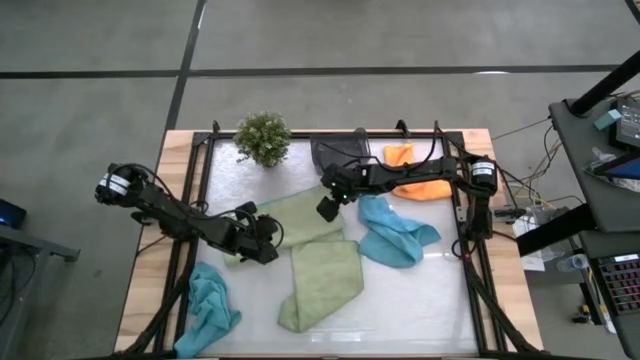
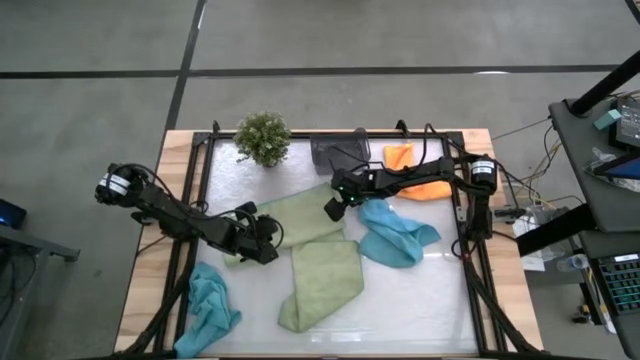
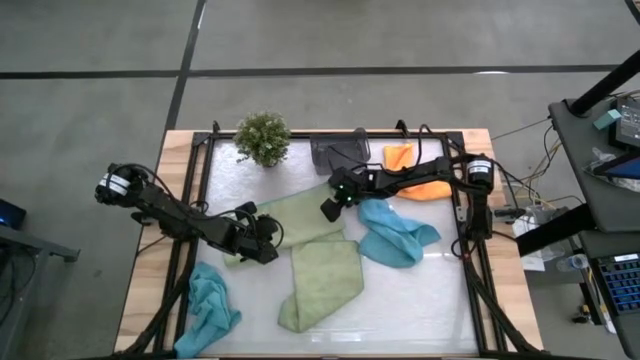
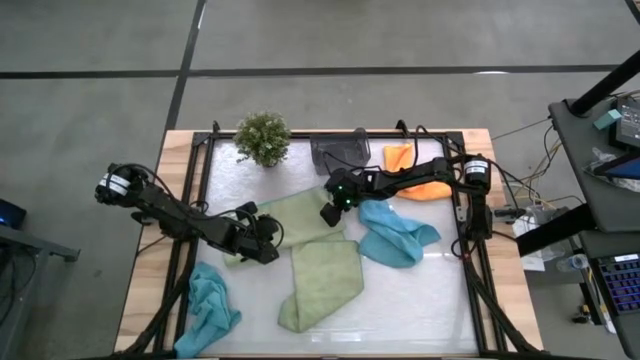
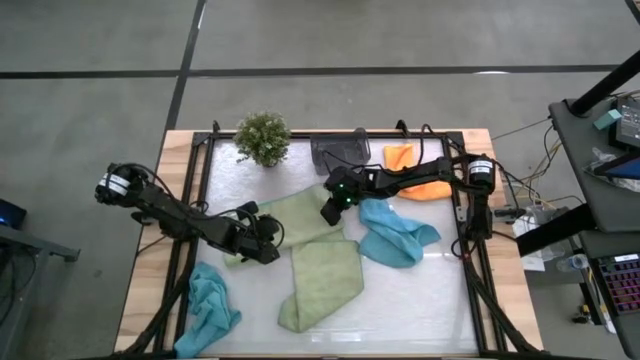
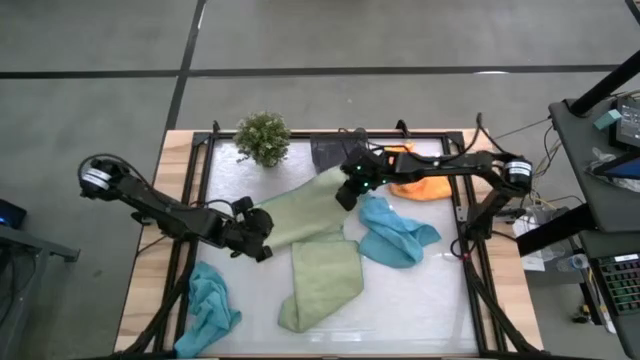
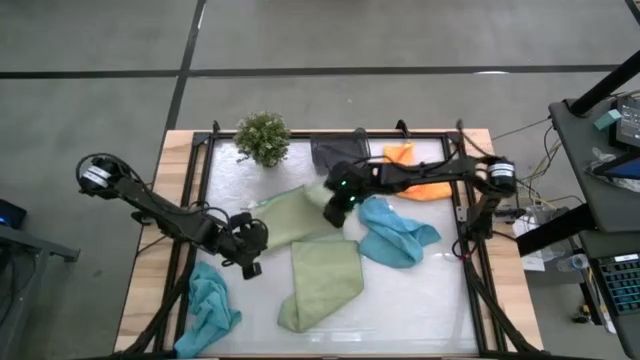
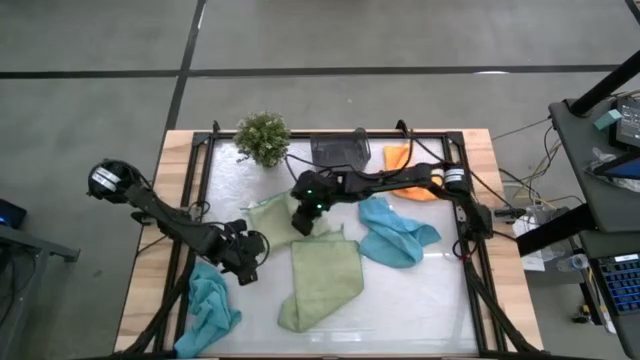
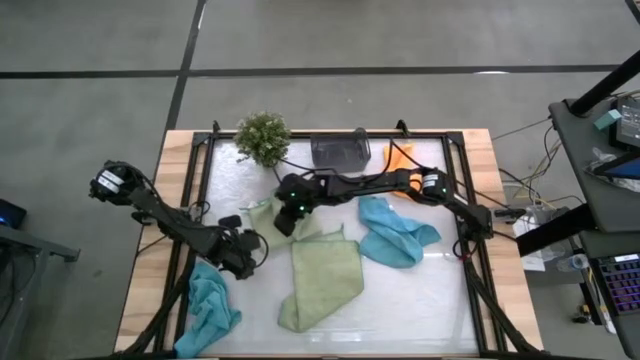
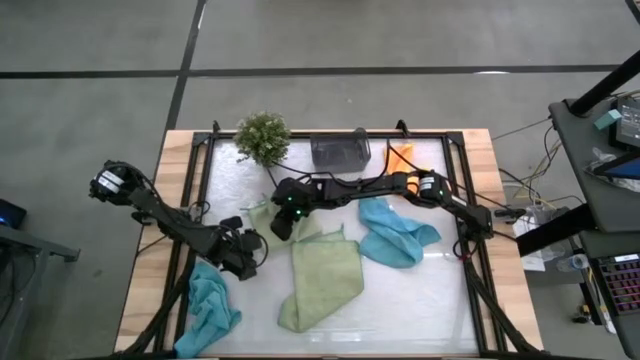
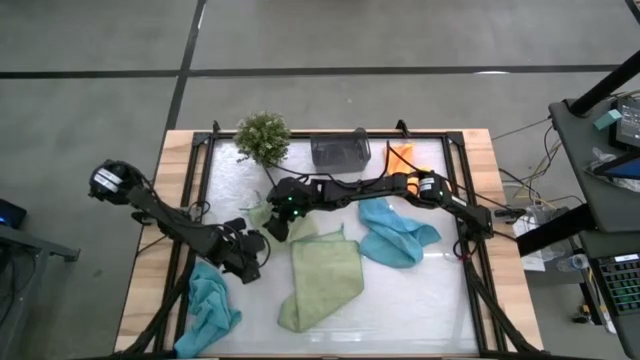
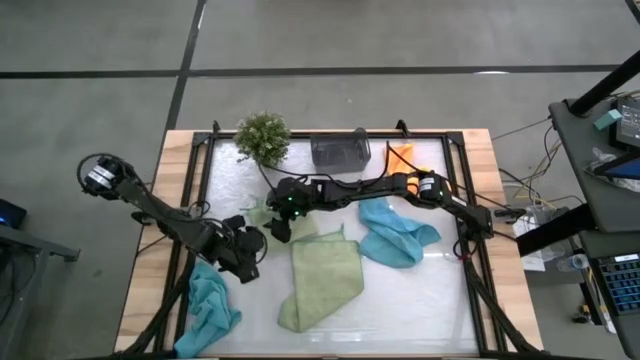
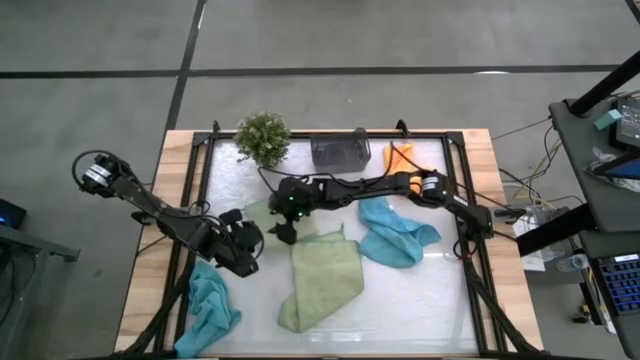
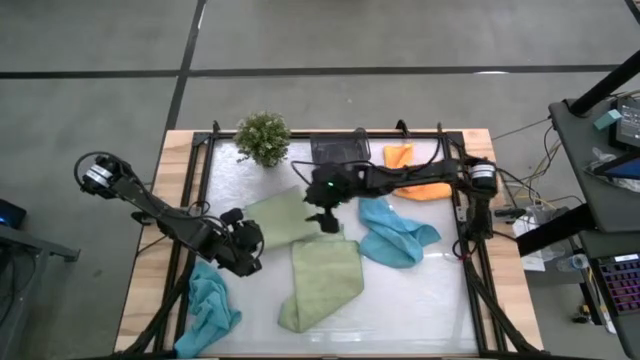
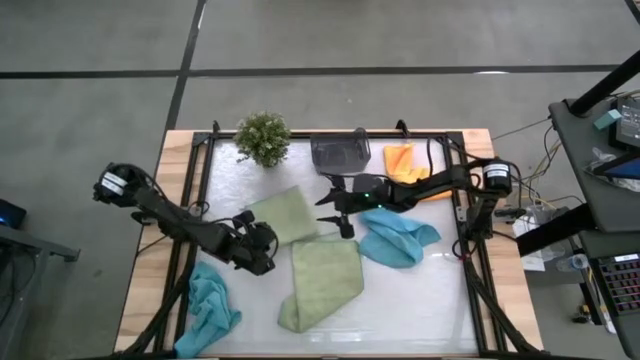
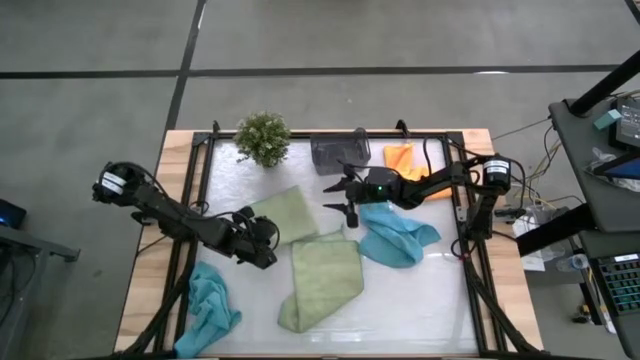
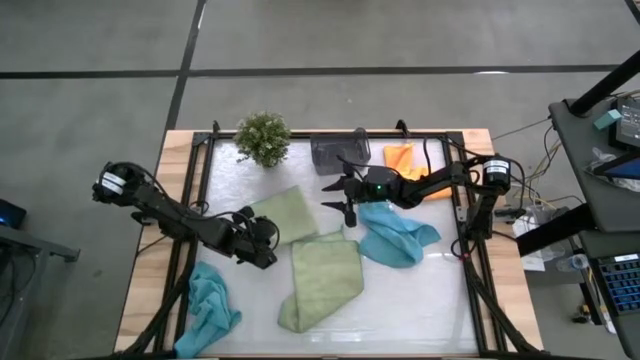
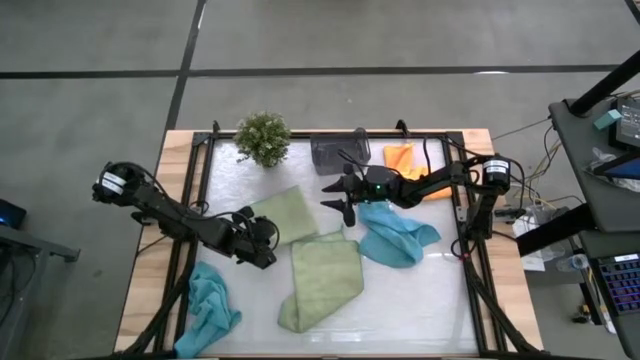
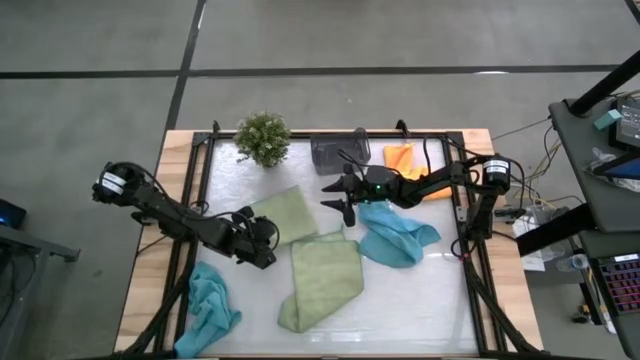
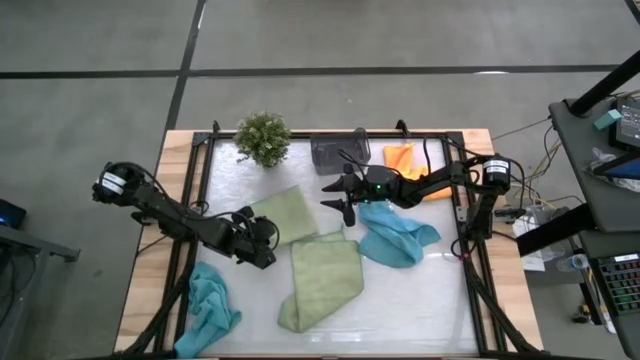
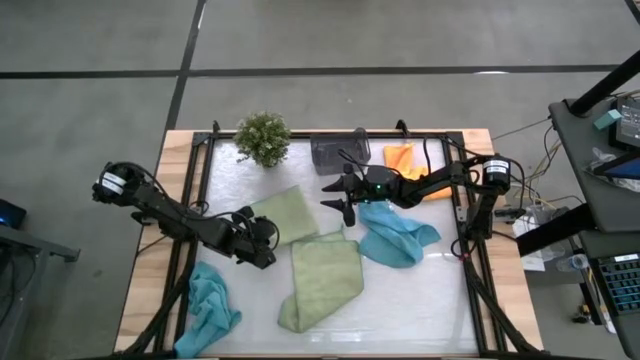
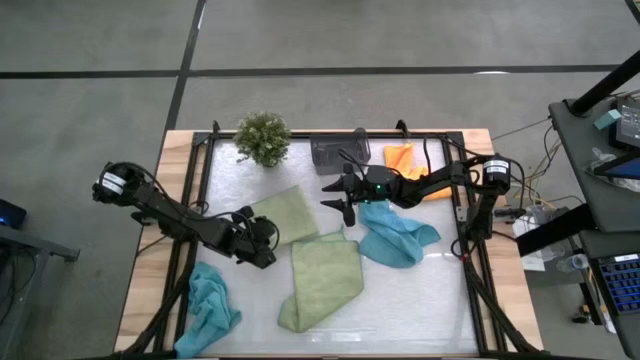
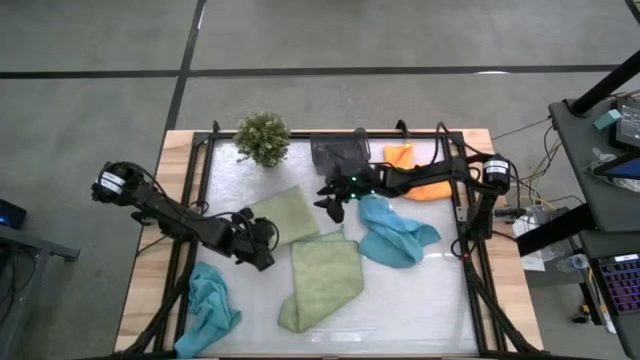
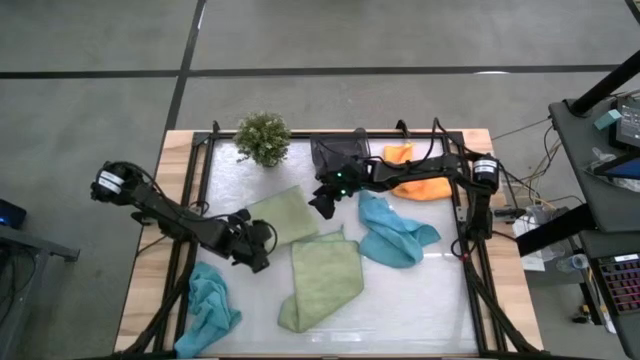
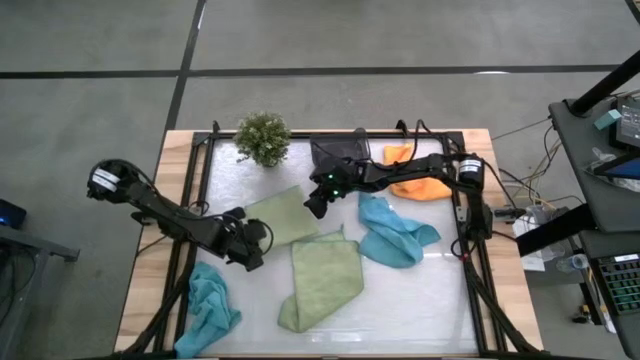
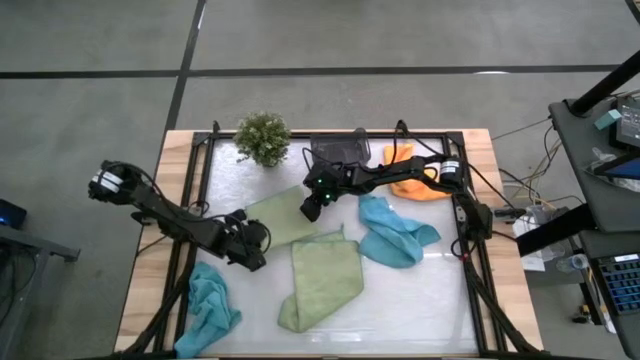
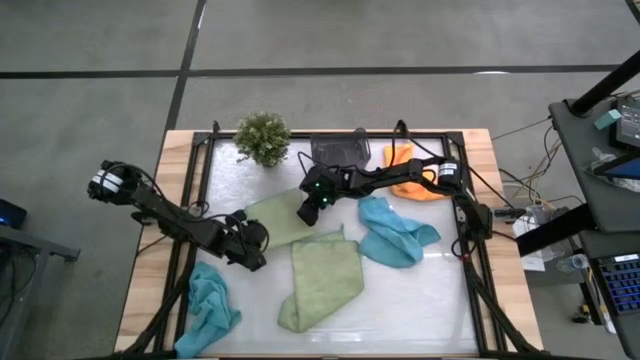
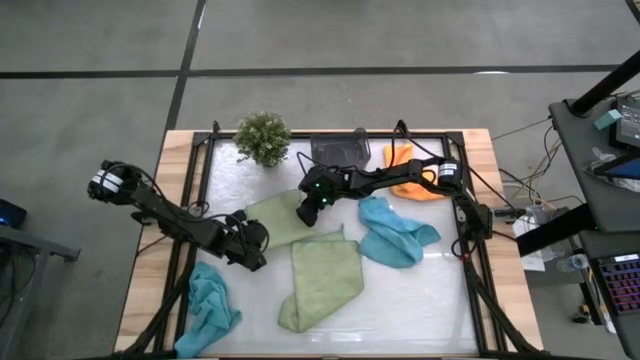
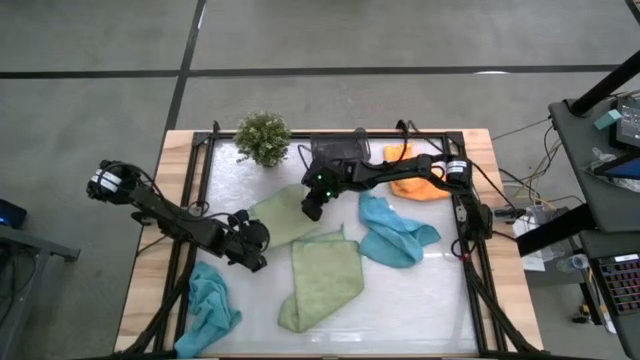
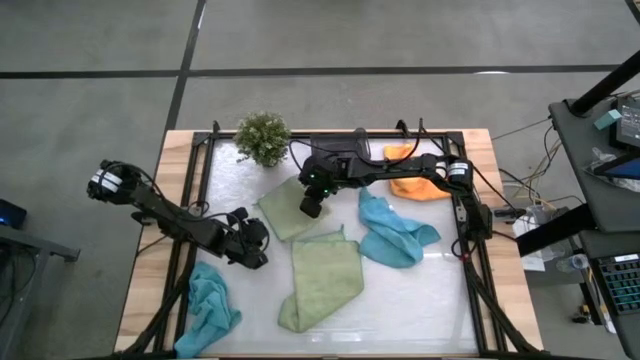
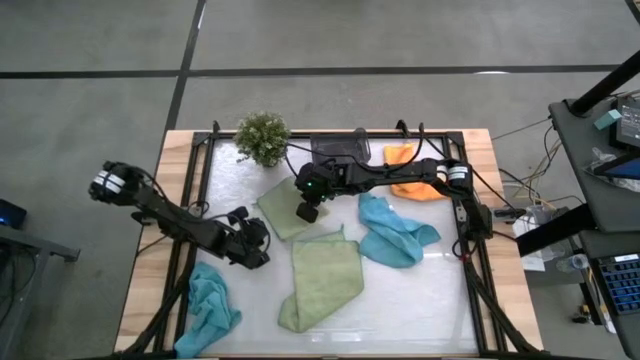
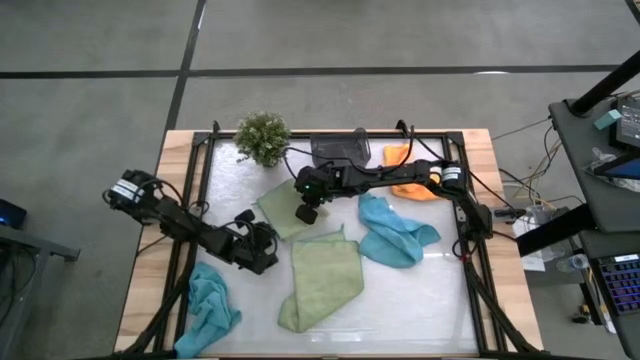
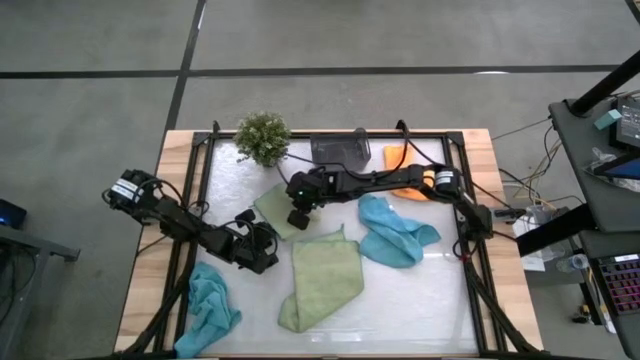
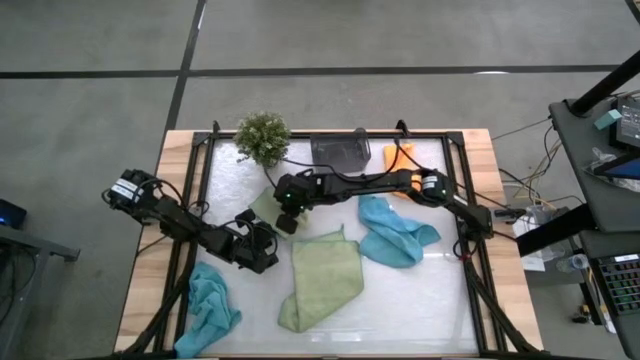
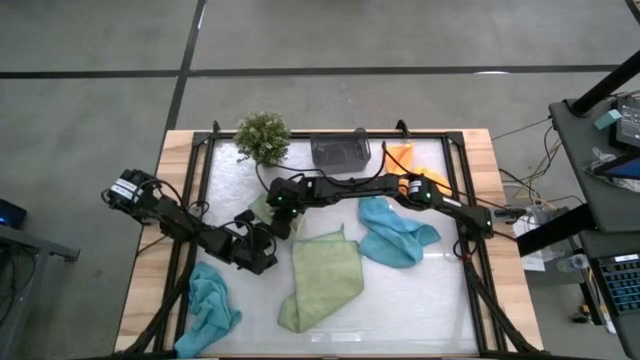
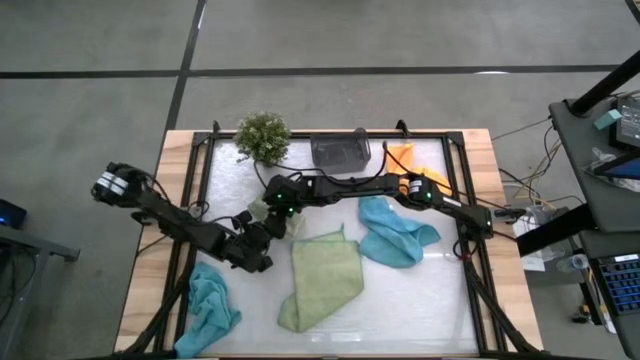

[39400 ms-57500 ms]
Task: Fold microfiber towels
Fold the left green towel

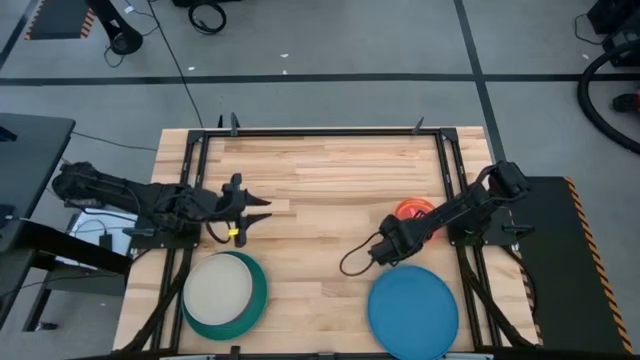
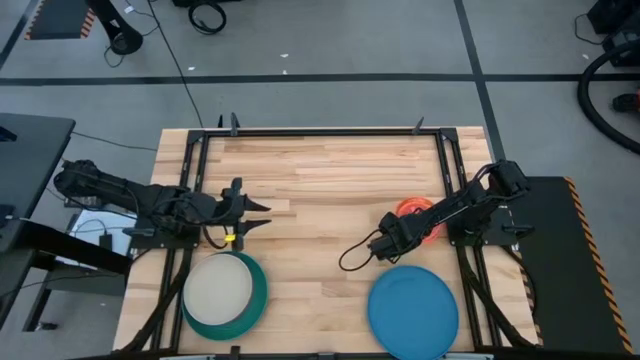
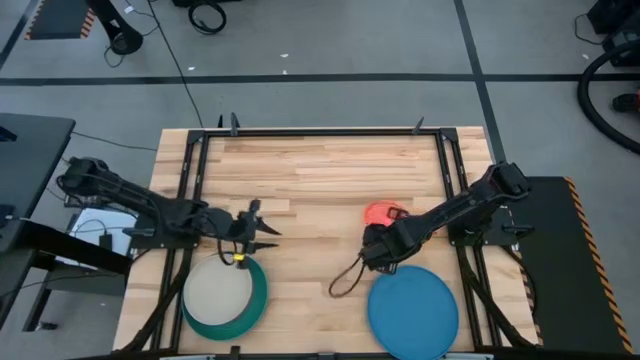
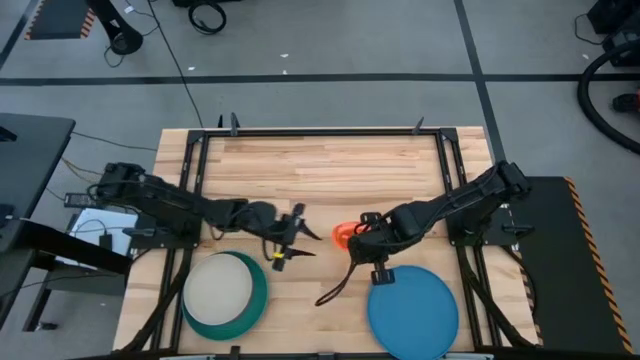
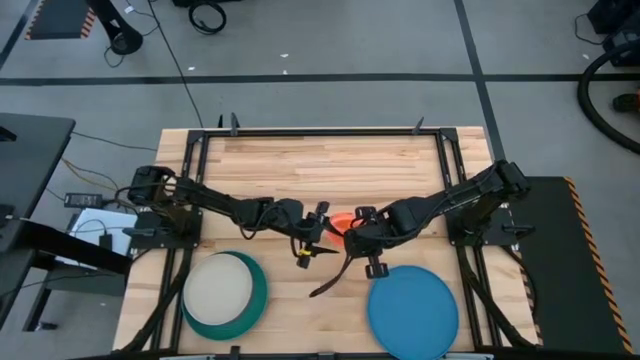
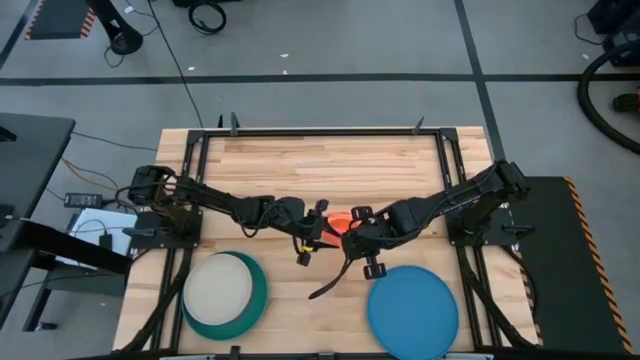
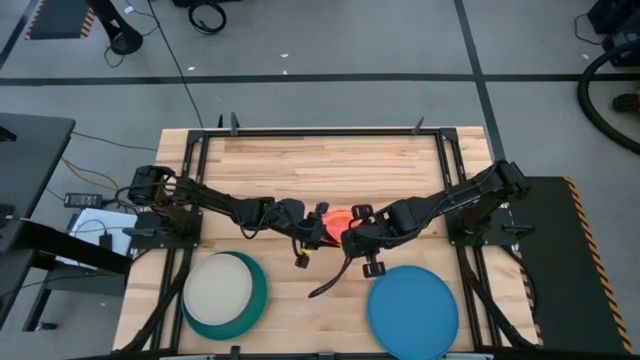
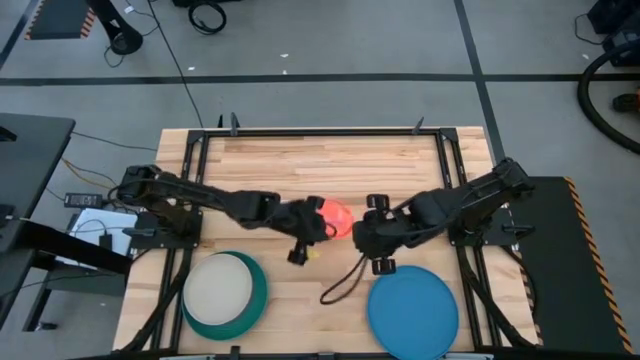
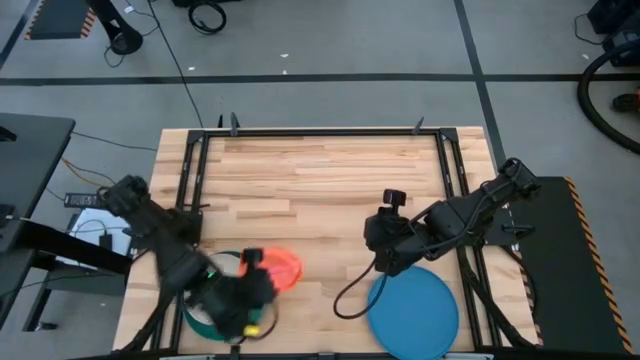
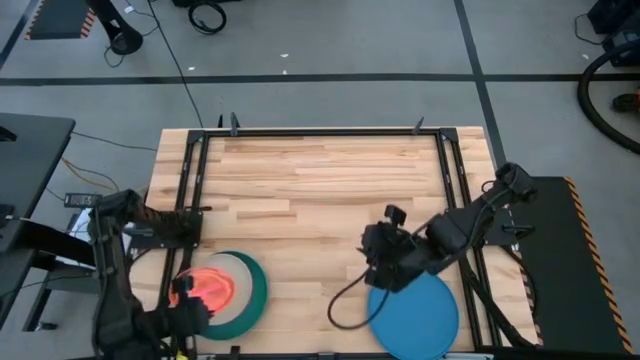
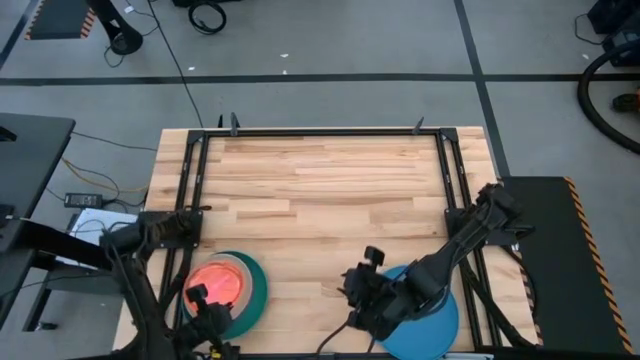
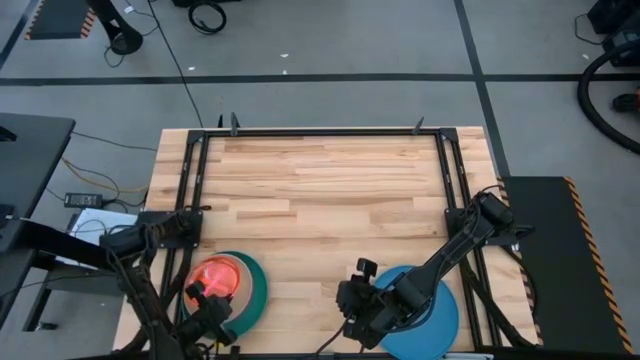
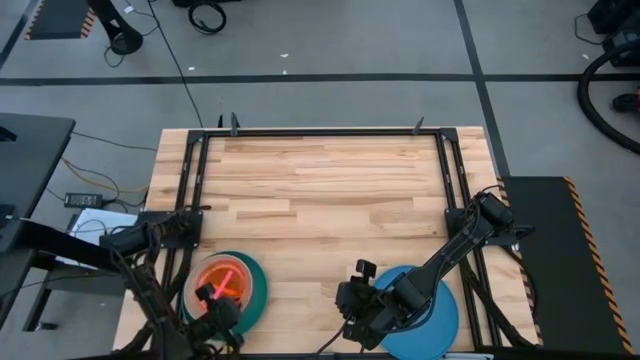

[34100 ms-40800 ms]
Task: Stack plastic plates
Stack the stacked transparent plates on top of the gray plate
